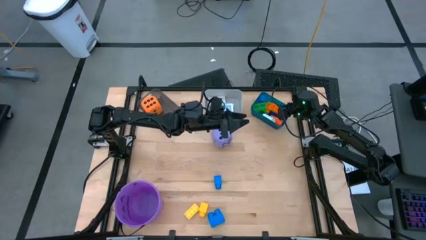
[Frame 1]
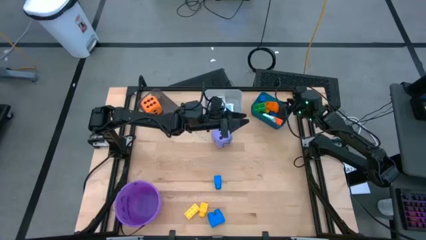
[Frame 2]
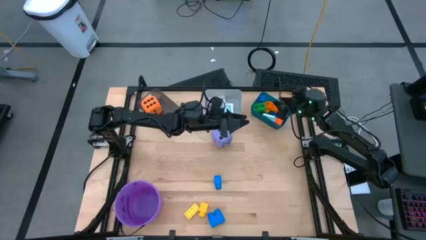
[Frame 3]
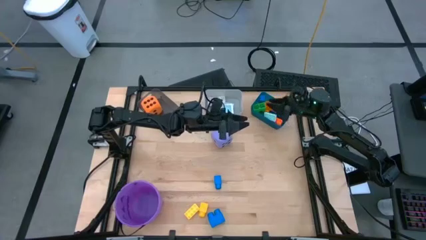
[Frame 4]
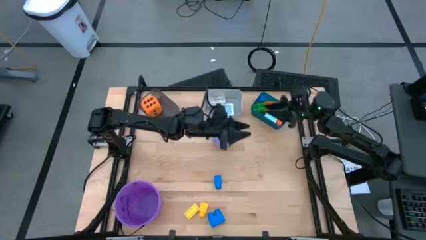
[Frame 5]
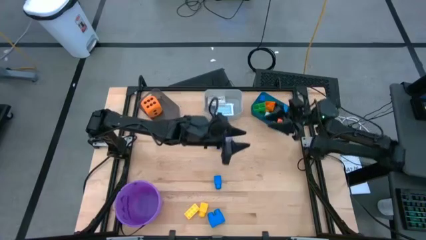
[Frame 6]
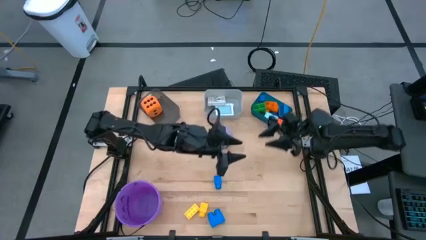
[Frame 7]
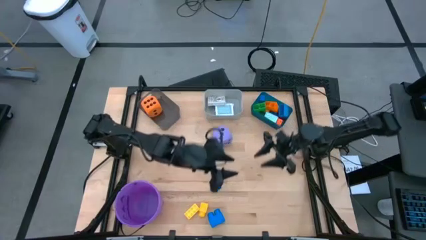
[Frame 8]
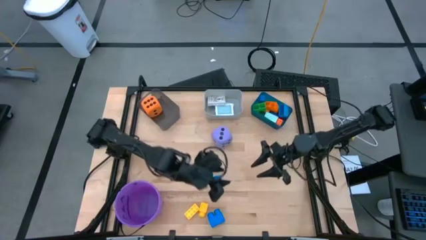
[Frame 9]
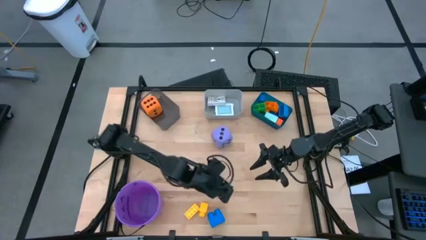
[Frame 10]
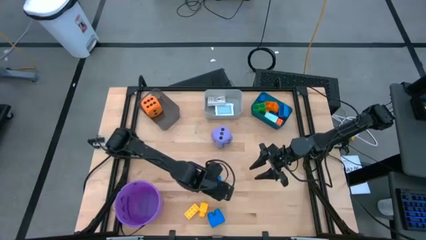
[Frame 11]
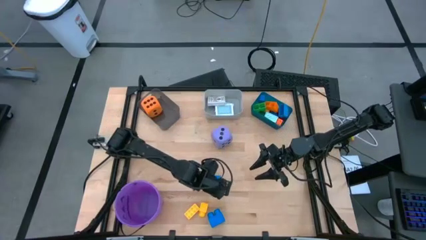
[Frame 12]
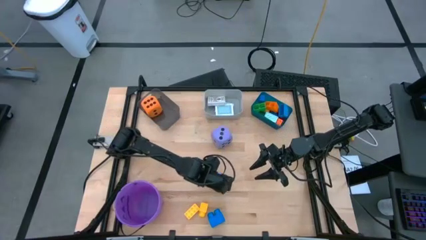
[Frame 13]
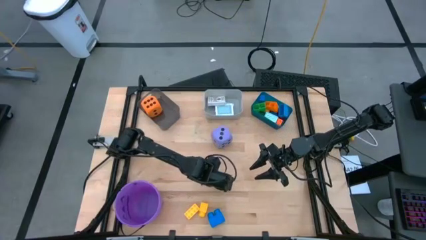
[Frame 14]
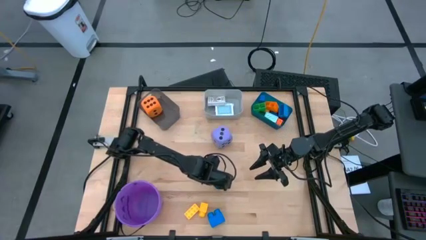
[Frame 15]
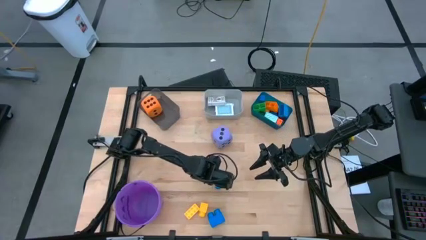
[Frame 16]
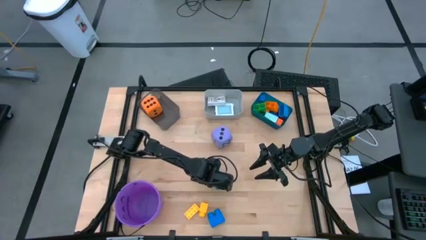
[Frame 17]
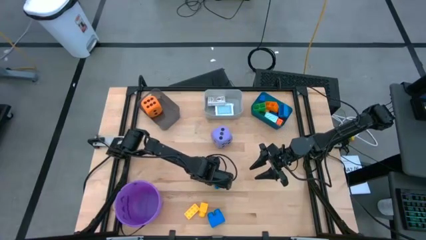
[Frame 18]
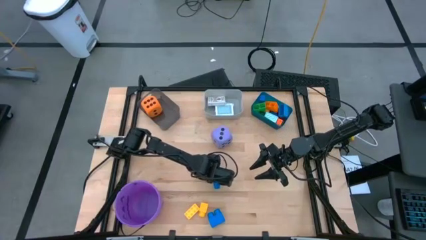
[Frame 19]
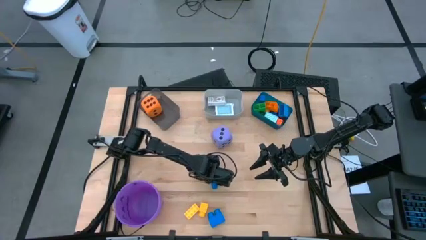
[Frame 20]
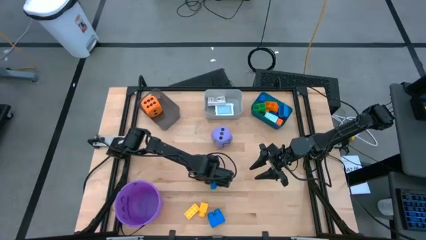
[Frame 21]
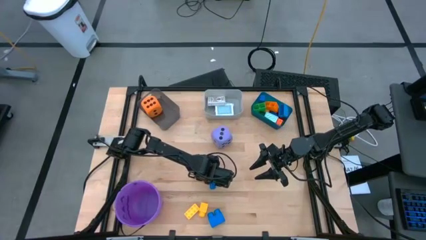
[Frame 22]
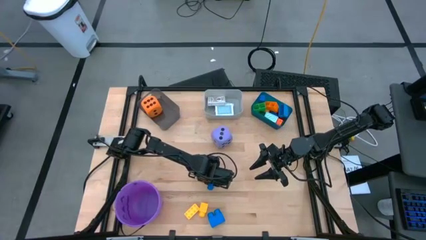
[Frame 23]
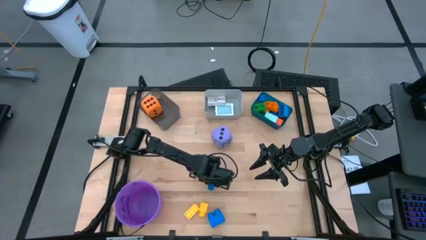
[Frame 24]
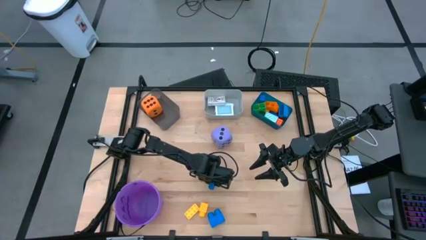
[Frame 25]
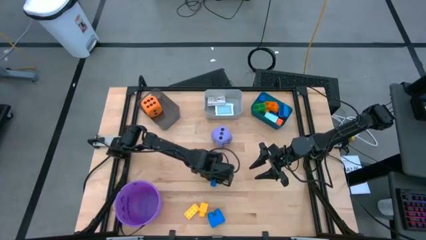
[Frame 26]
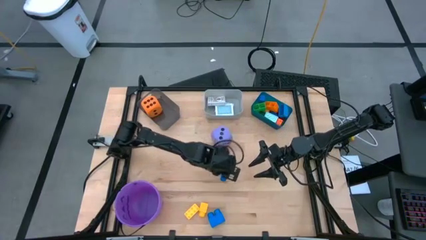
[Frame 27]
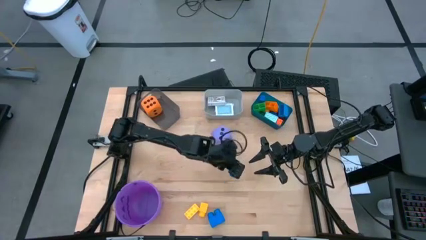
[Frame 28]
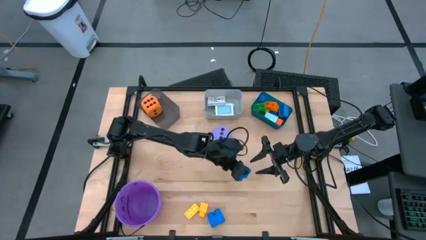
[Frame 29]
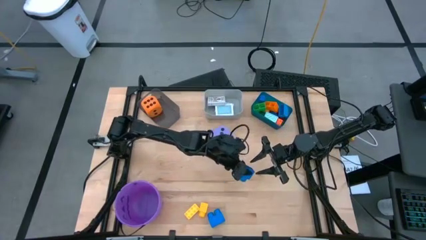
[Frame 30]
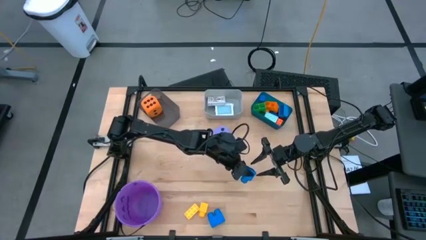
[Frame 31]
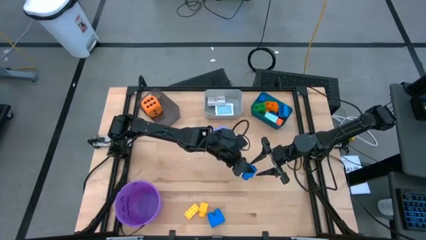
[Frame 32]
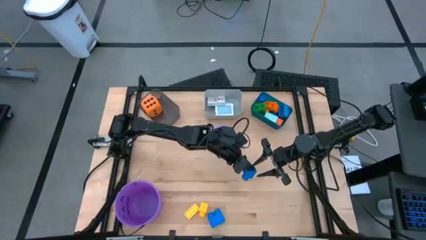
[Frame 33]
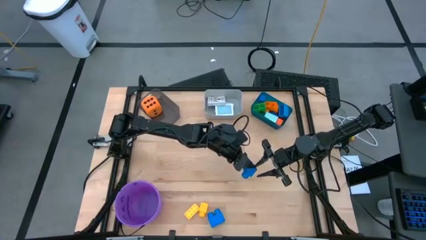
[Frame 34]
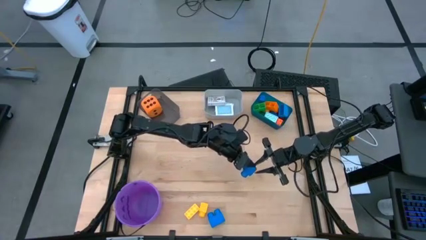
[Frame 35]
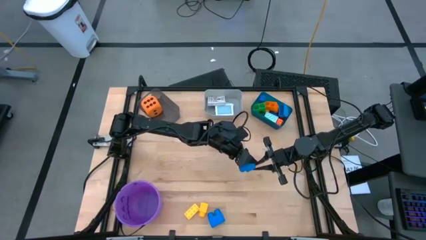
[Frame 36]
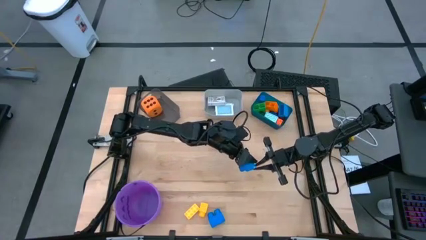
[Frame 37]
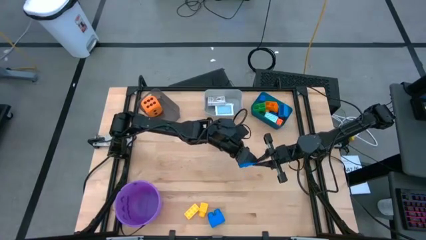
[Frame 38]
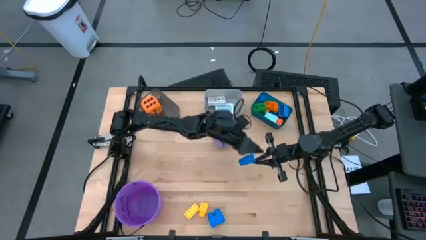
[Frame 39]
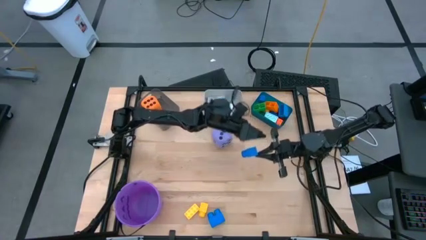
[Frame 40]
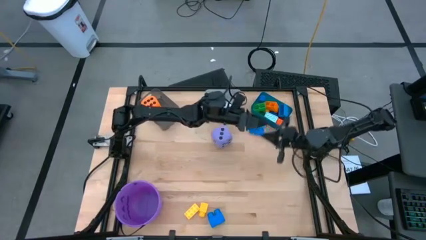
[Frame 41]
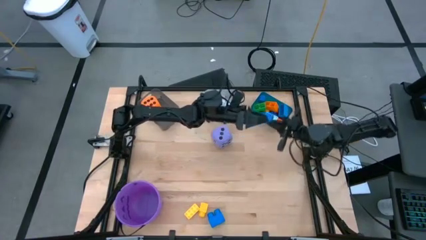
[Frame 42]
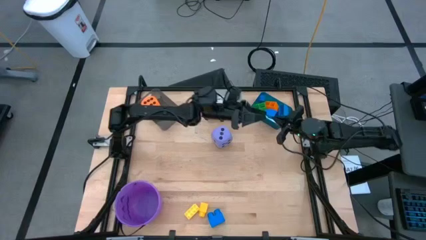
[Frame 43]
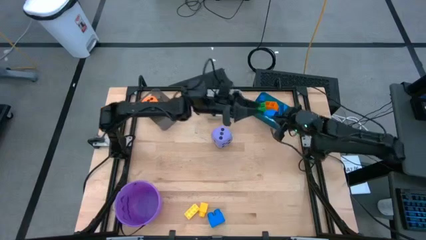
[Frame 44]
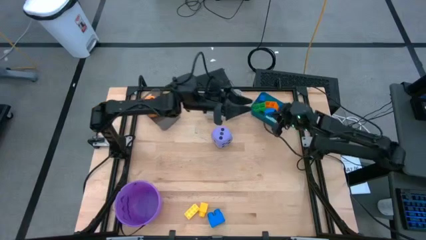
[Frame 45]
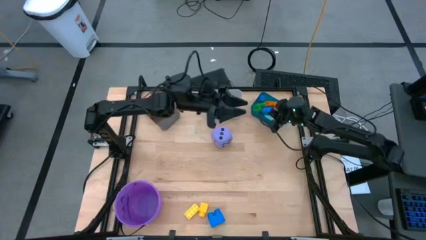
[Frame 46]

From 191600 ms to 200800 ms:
Task: Pick & Place Toys
Put the blue game piece into the blue bin

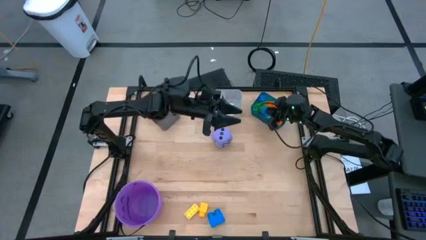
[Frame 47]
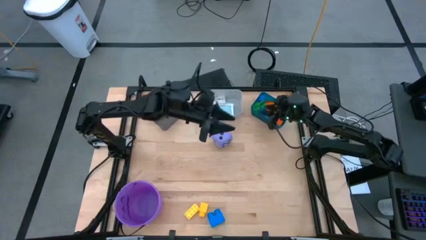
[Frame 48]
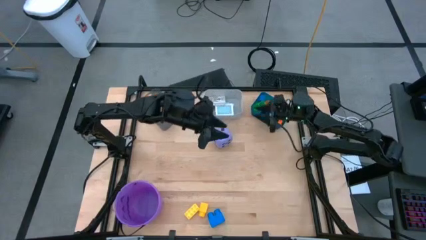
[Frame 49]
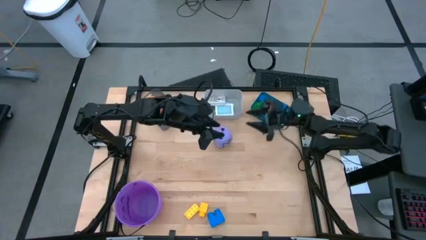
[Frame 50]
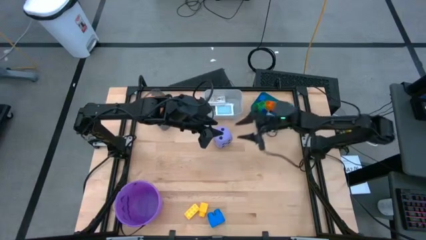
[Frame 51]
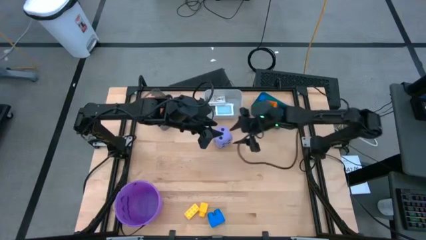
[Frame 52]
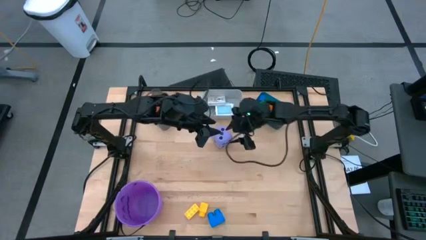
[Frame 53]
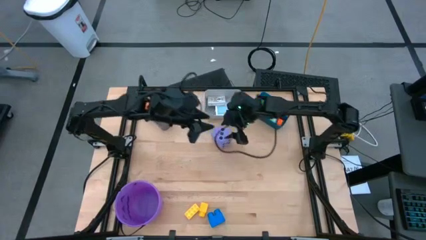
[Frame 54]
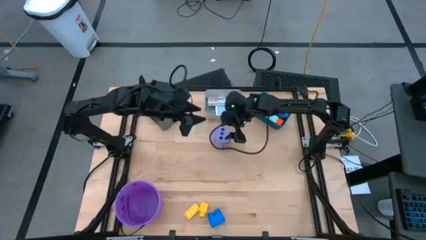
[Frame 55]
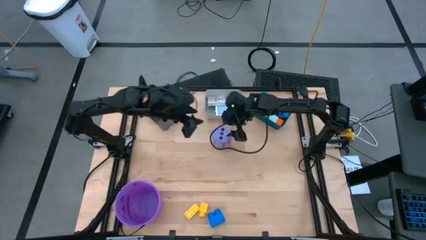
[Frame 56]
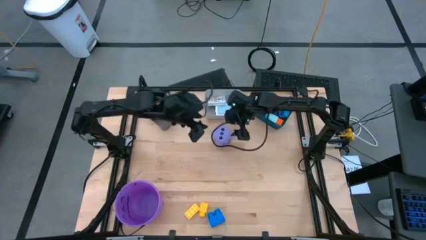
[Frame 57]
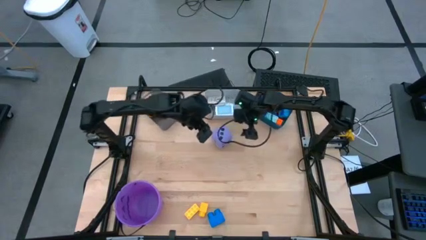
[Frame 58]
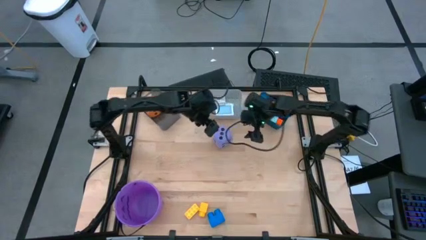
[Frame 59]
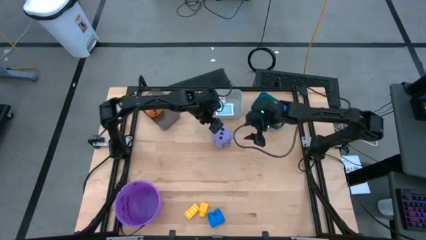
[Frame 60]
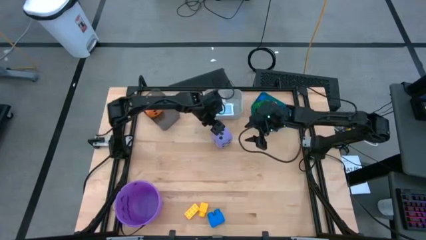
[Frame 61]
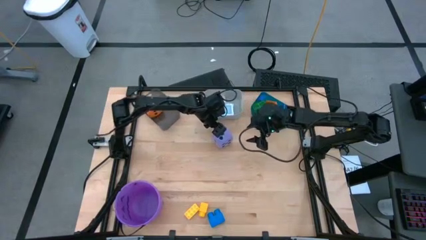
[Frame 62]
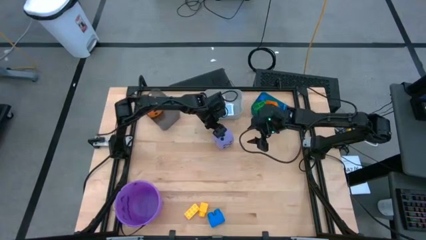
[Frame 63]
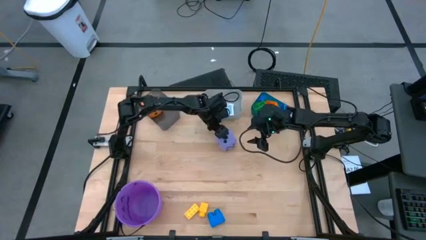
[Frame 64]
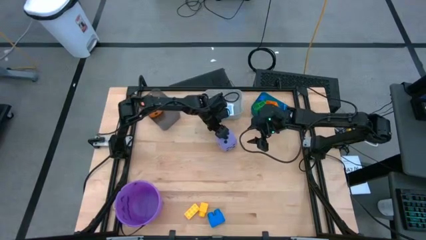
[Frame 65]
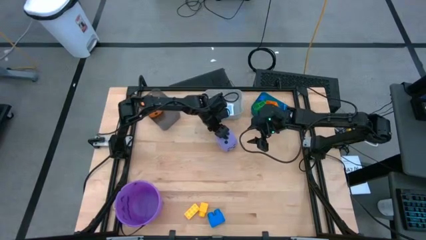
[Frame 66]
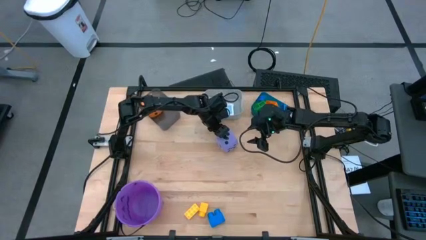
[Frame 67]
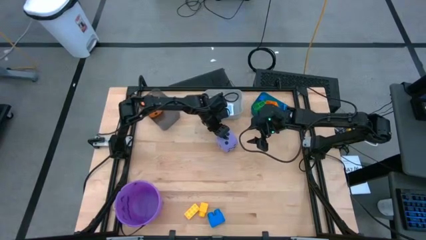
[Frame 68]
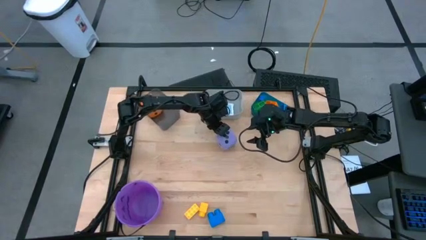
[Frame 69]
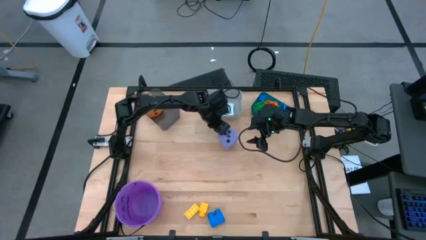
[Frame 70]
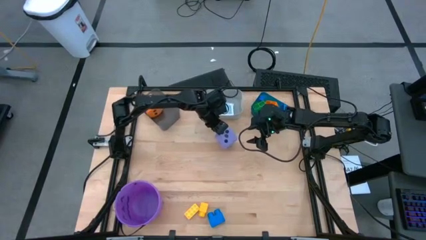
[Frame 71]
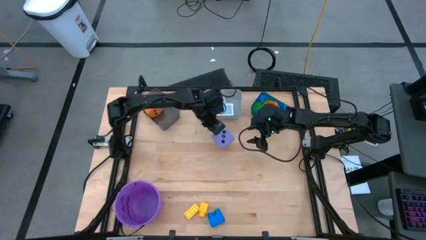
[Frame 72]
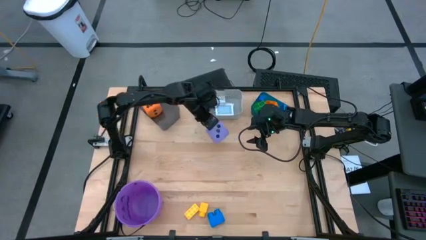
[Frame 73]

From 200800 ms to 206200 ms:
Put the purple dice into the black bin
